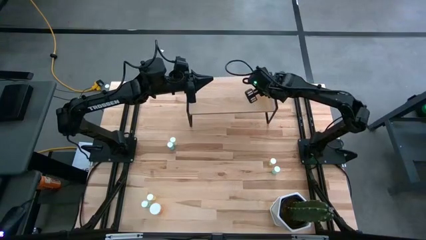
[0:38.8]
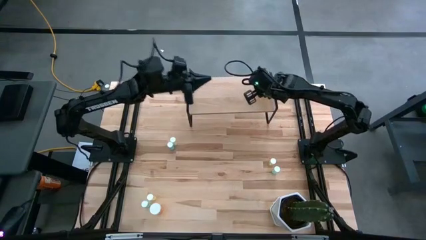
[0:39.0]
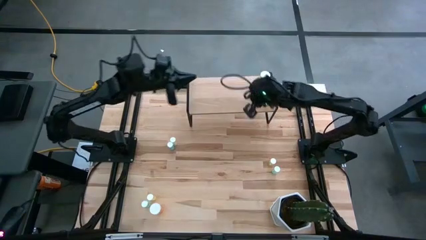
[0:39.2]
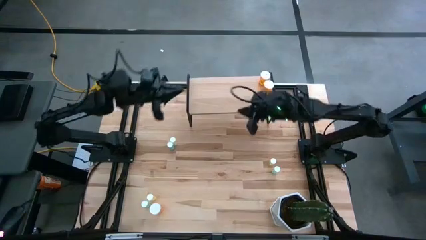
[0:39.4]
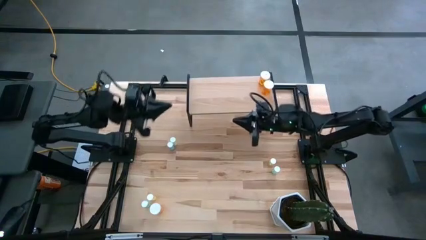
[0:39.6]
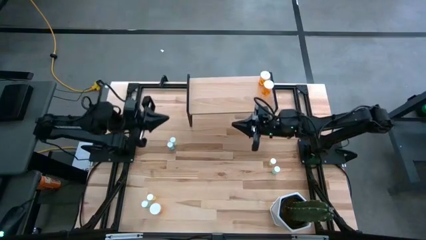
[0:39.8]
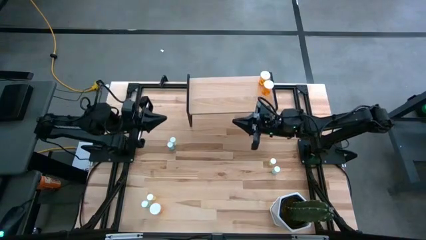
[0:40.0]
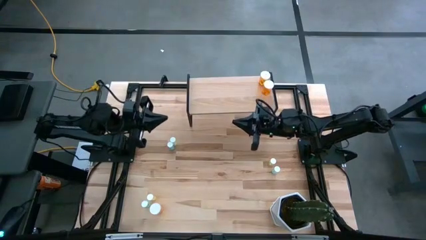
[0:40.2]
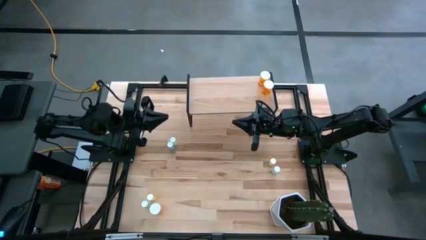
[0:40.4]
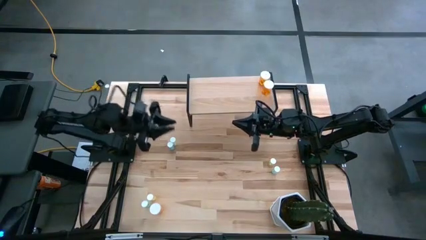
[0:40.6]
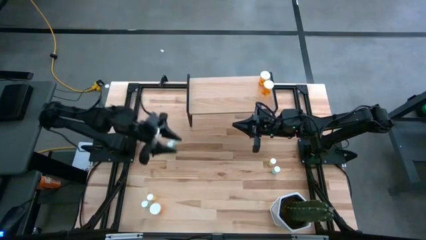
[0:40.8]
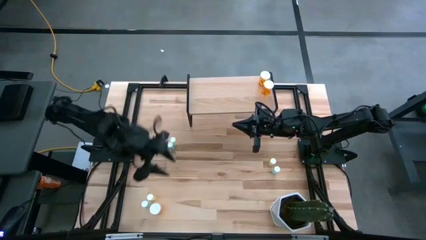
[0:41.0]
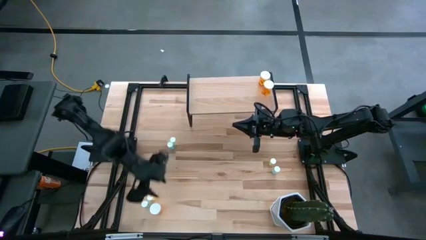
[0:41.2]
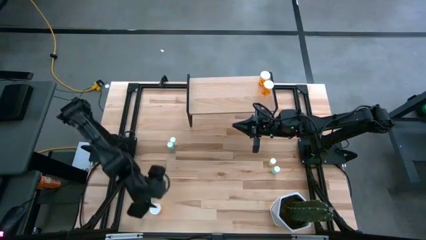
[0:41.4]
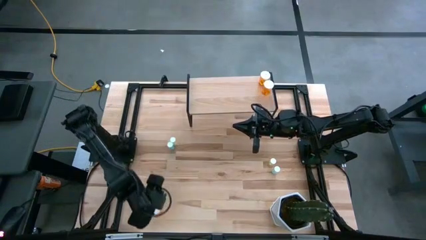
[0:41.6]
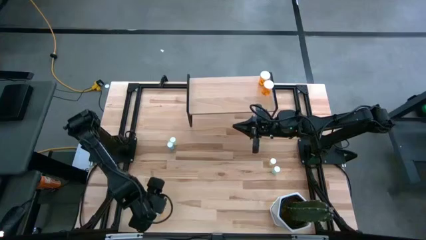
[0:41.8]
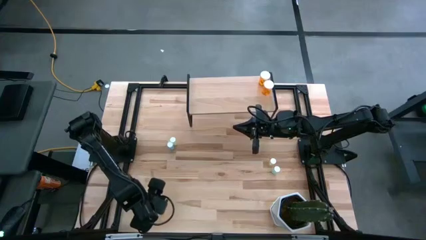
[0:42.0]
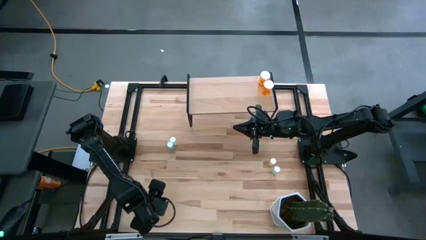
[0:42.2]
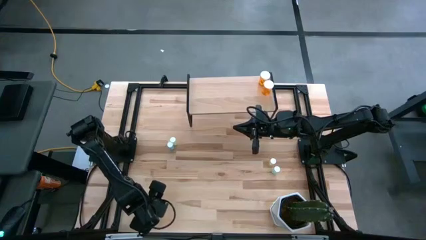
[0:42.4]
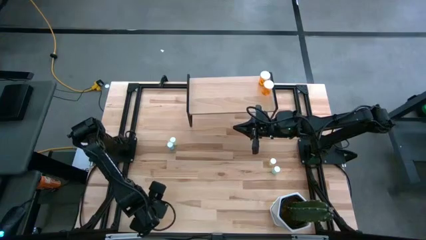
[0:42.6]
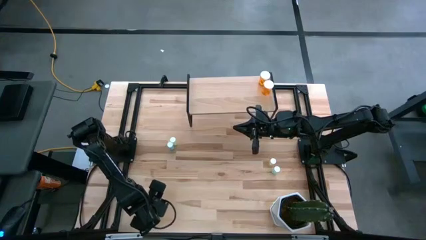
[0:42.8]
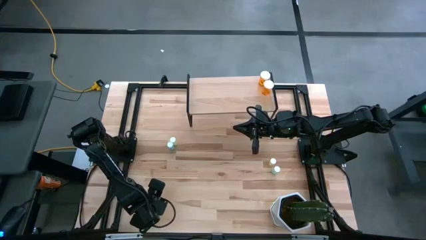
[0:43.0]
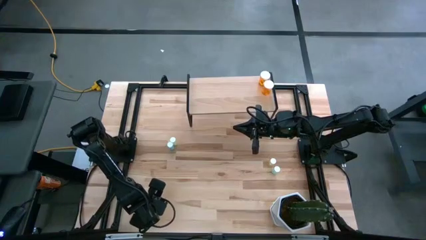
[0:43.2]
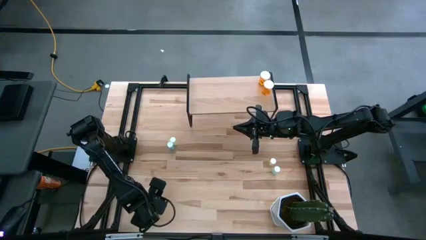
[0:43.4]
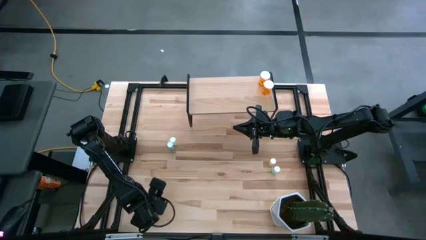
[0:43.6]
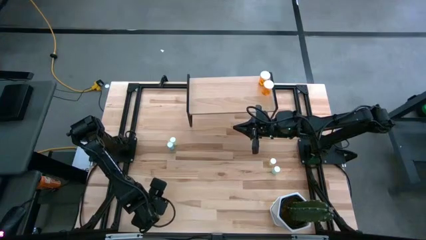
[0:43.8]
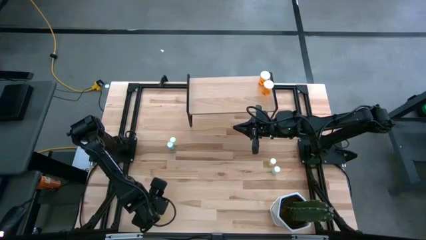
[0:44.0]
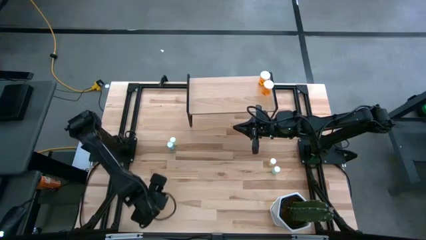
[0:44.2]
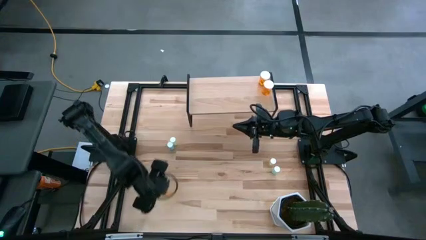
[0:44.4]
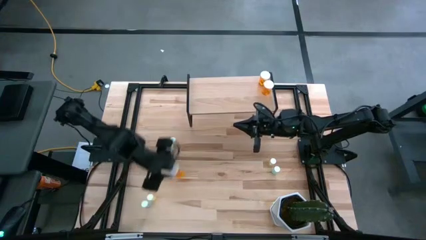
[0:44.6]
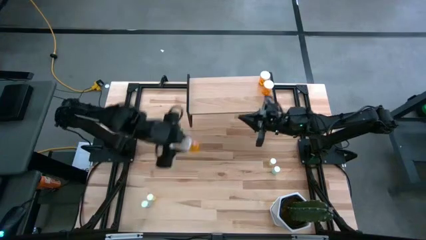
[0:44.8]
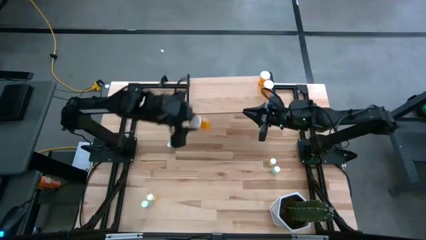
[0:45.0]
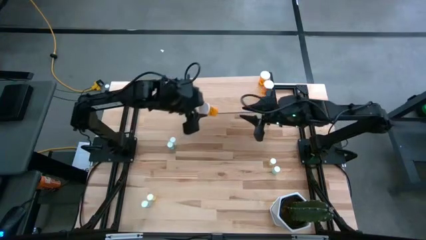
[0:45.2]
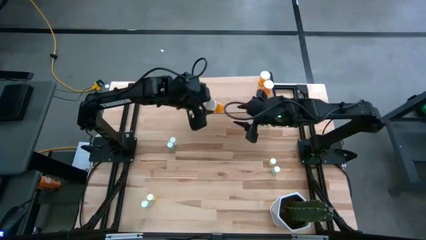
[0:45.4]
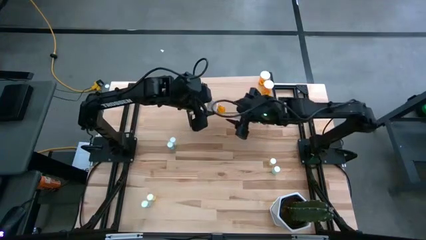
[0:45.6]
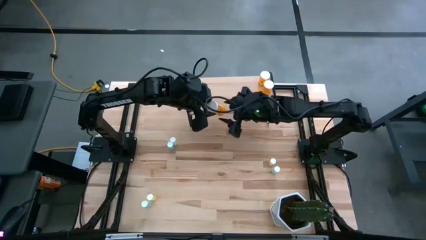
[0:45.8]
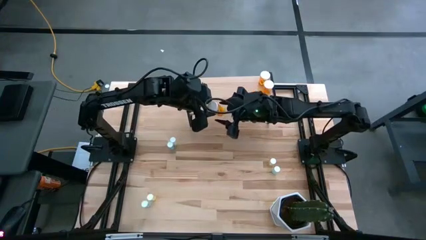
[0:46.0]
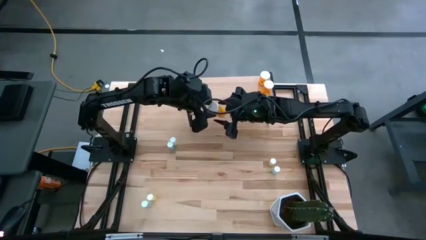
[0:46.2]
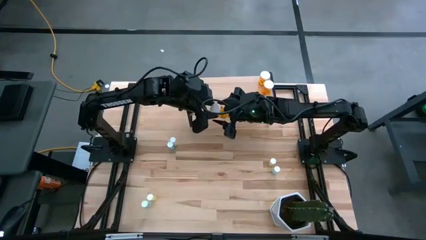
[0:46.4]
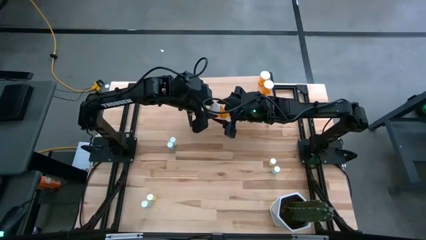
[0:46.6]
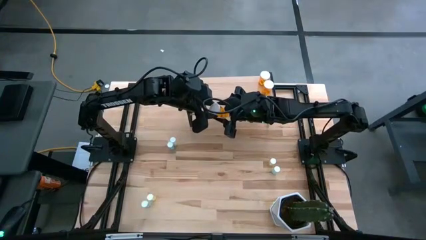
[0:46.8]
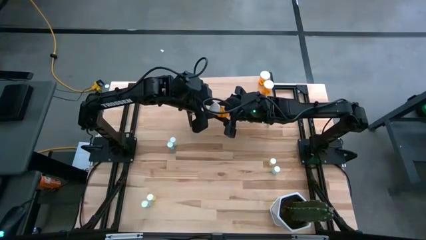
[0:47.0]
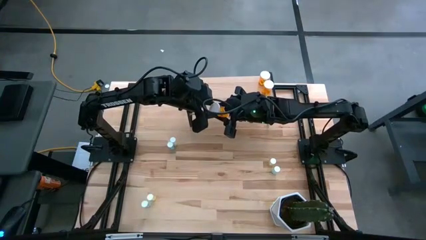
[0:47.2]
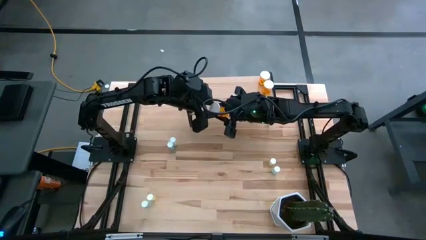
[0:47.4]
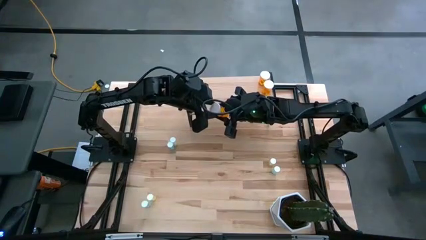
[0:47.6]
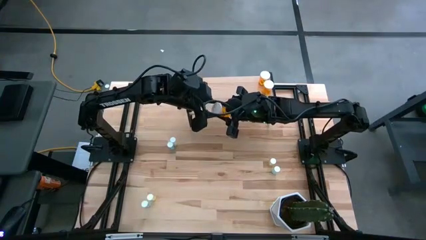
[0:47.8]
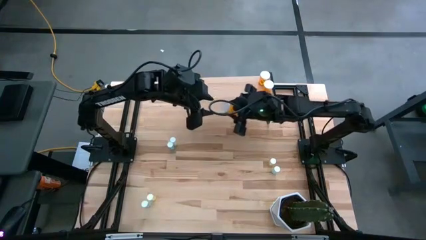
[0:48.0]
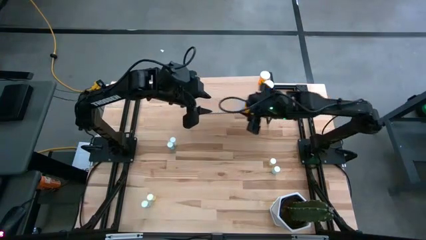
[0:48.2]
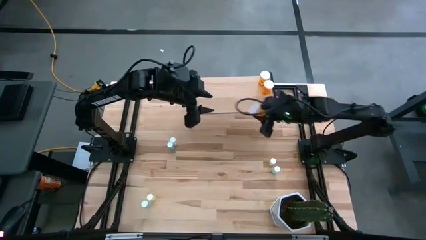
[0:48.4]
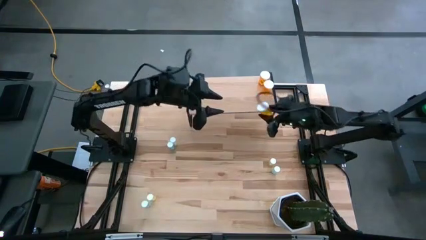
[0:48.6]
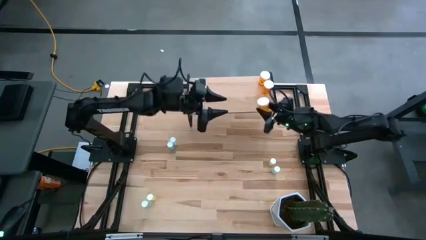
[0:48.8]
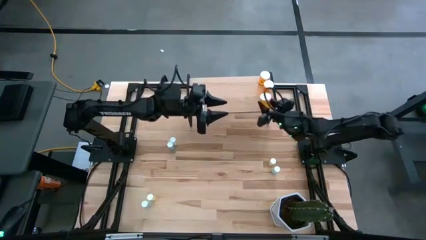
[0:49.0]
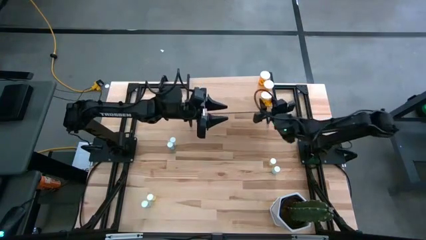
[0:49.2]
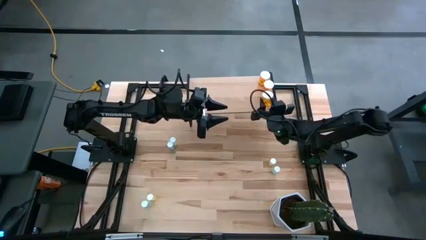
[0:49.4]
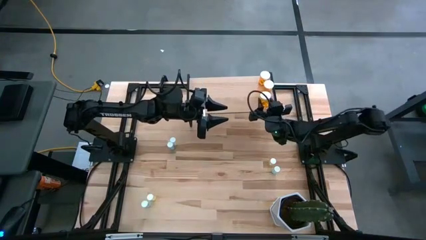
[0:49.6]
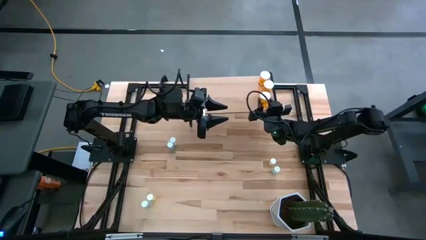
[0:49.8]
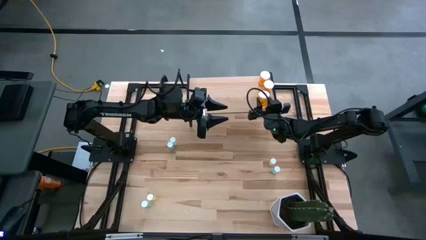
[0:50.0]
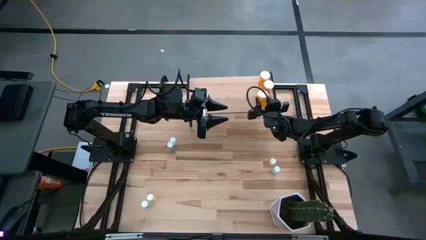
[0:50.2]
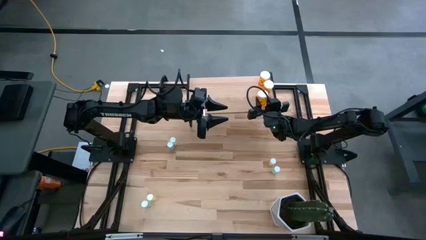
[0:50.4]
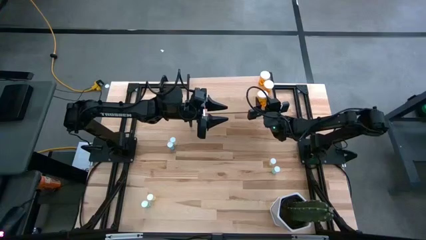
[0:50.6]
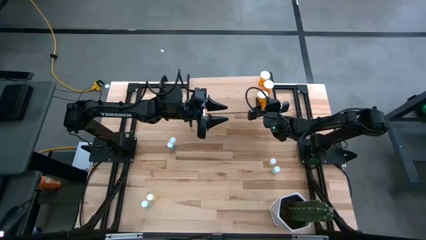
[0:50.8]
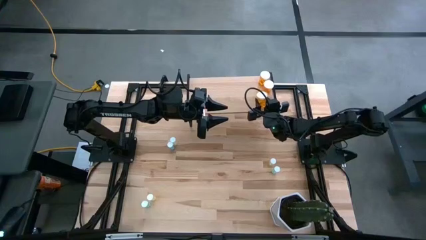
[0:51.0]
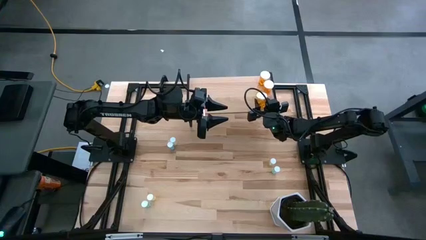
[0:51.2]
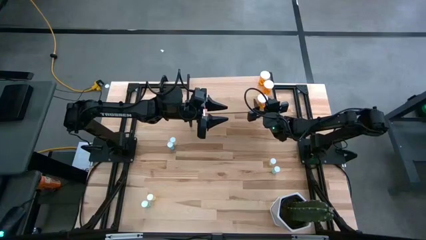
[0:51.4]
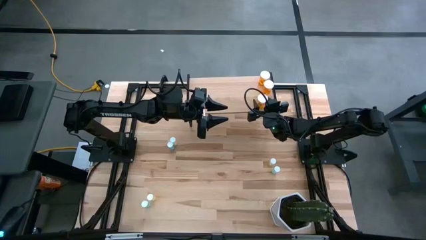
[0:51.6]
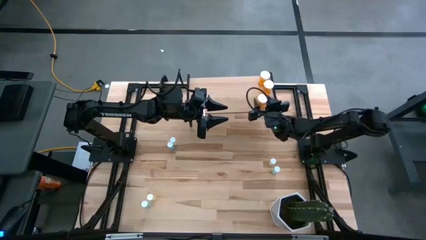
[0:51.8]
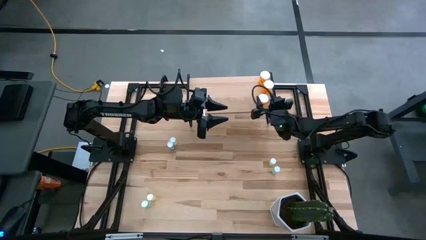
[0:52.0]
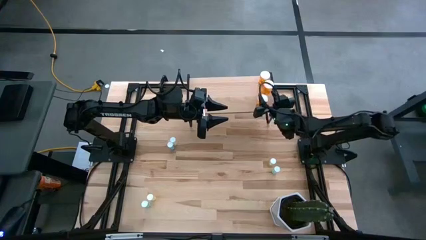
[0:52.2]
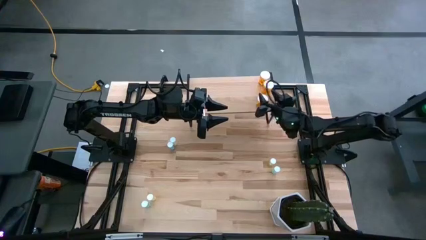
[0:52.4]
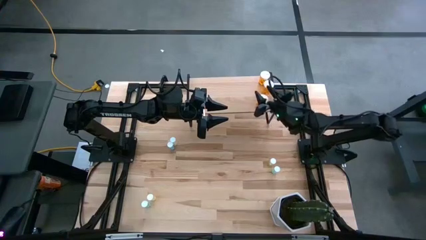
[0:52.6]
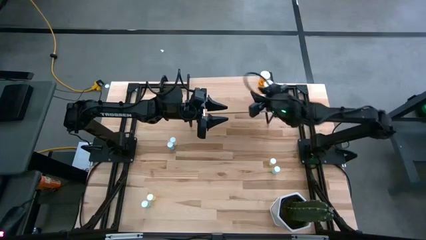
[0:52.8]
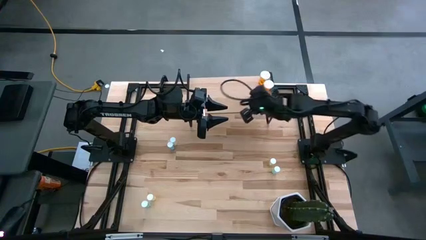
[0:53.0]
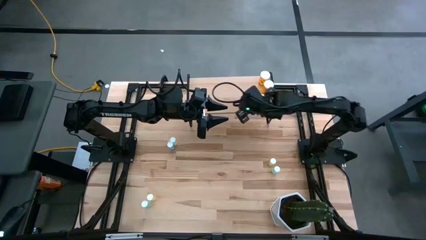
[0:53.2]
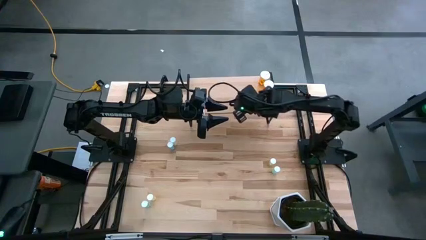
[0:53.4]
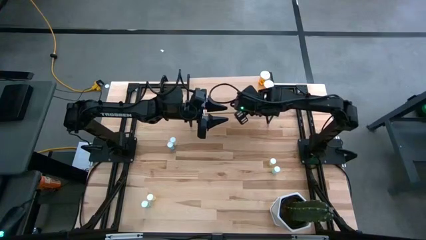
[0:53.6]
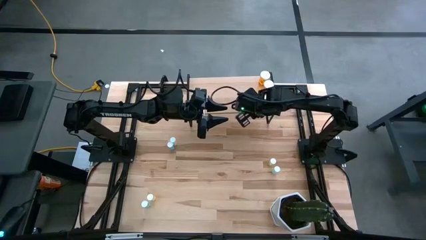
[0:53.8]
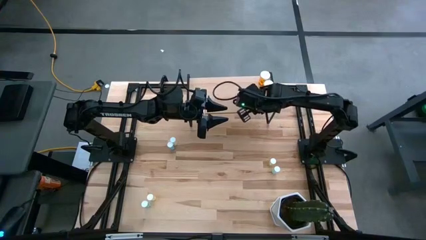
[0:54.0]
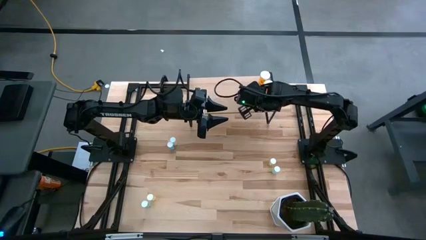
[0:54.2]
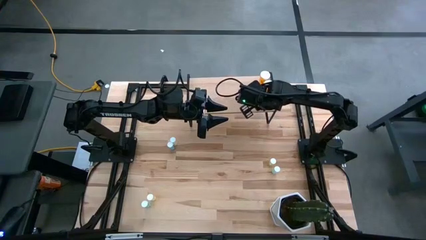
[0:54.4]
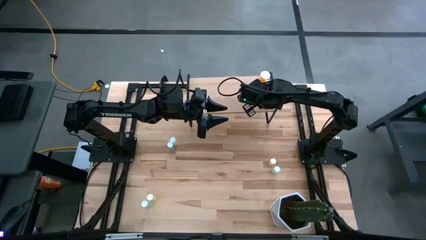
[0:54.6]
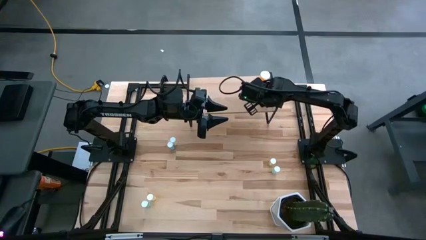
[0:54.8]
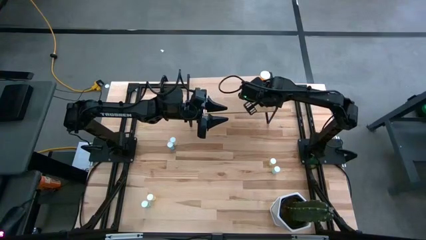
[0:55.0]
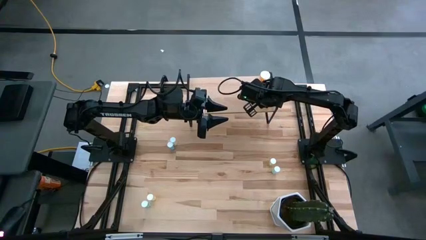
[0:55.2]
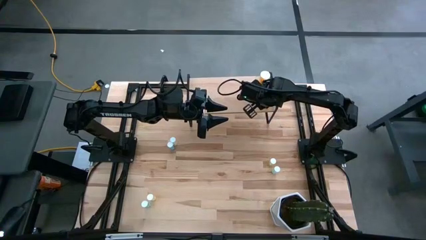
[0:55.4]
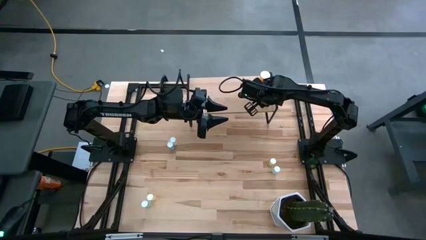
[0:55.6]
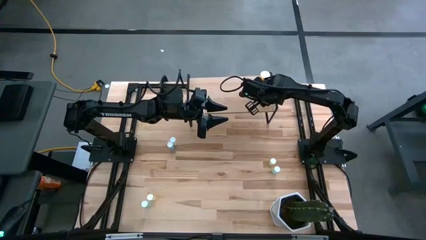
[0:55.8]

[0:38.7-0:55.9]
Task: Pick and place medicine bottles onto shelf by color
Put the orange pill bottle on the shelf aligned with the orange pill bottle

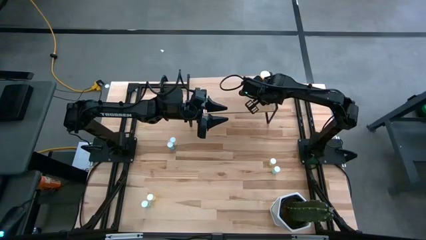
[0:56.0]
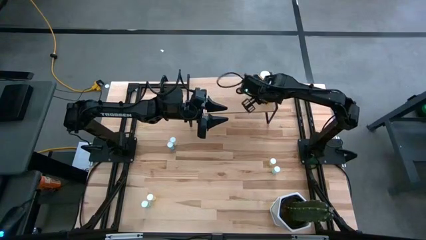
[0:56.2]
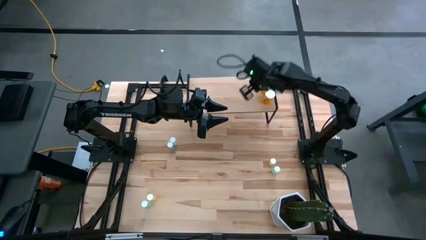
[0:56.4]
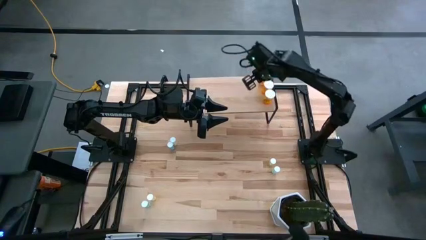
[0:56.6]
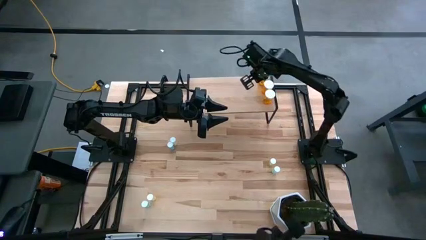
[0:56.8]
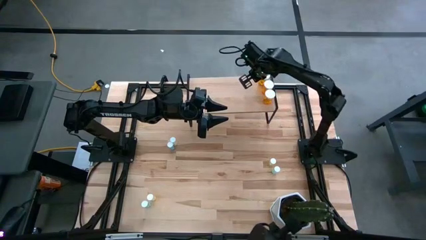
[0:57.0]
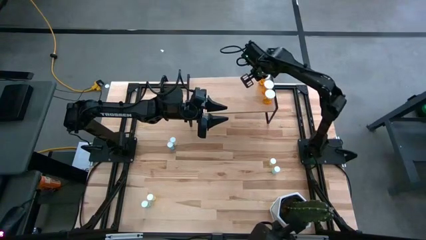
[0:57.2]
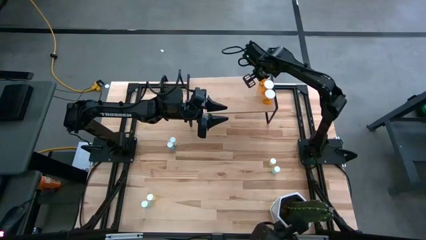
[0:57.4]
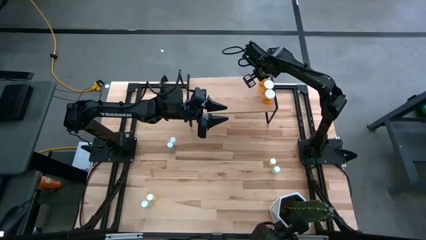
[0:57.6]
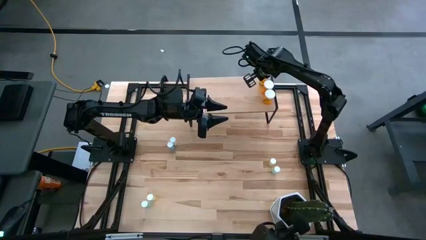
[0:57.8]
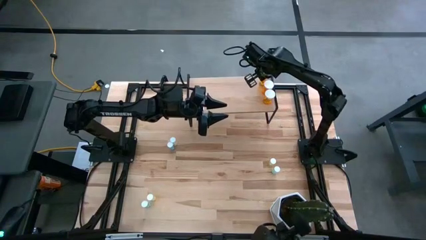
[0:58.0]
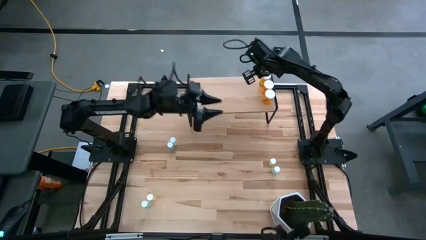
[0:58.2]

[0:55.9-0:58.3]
Adjust the orange pill bottle on the shelf
